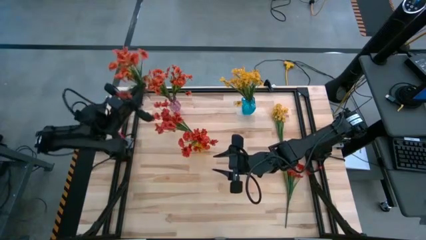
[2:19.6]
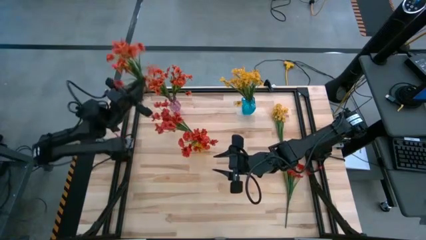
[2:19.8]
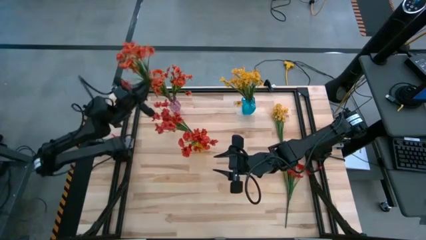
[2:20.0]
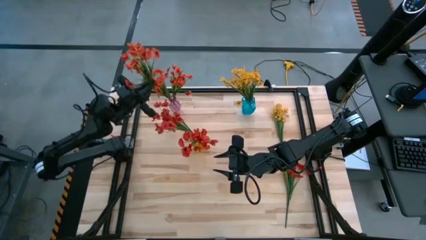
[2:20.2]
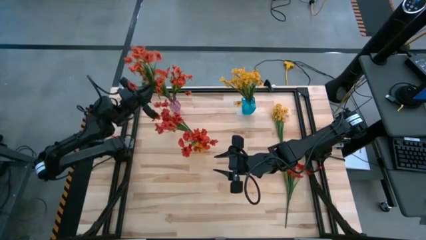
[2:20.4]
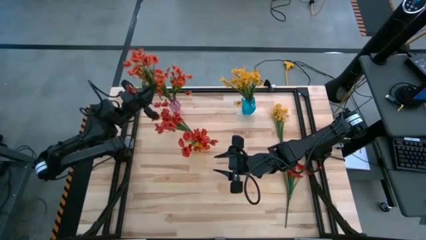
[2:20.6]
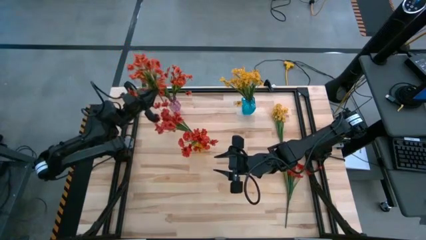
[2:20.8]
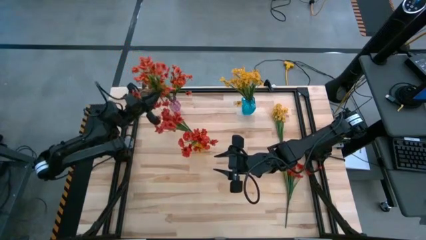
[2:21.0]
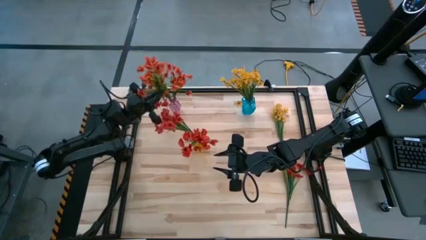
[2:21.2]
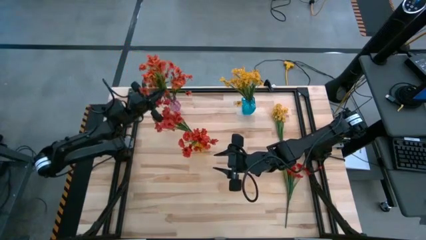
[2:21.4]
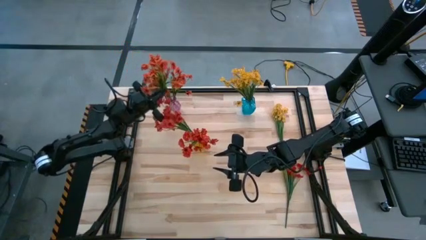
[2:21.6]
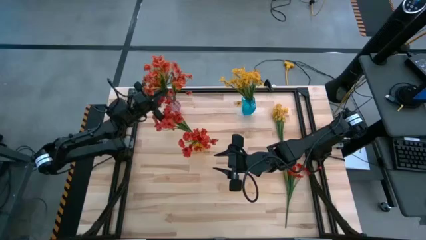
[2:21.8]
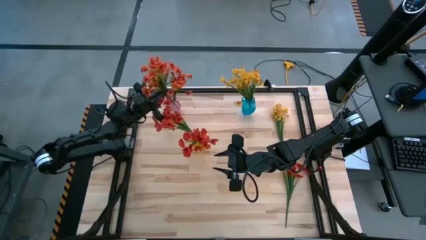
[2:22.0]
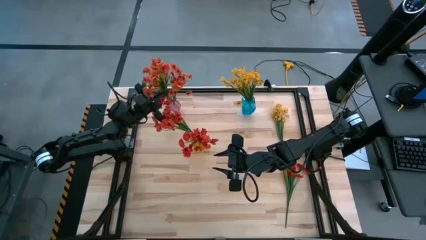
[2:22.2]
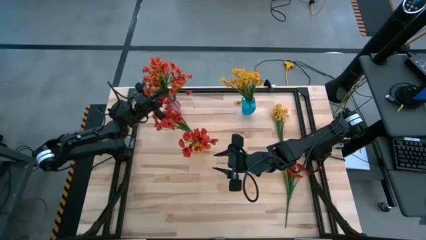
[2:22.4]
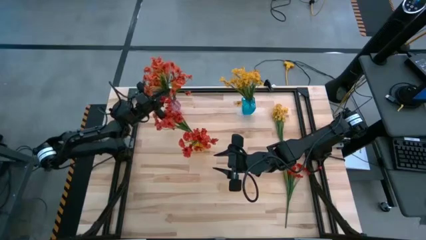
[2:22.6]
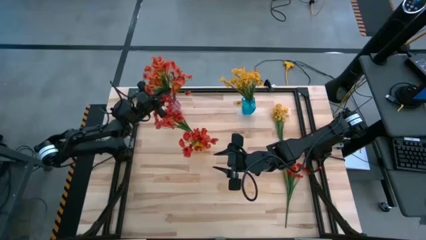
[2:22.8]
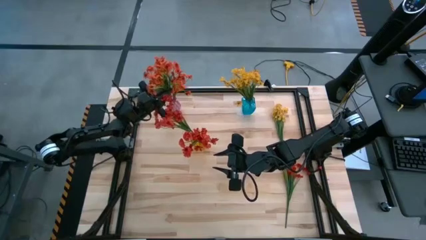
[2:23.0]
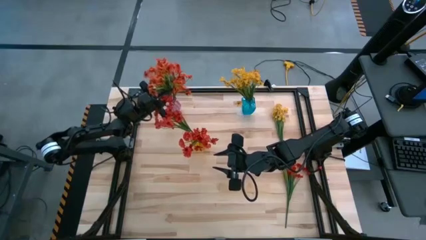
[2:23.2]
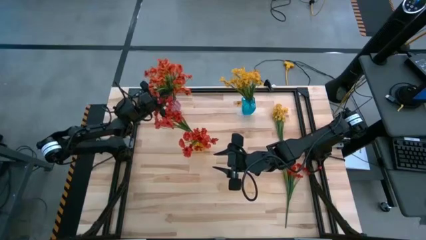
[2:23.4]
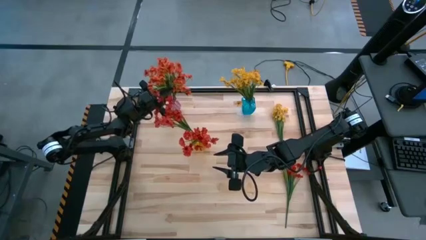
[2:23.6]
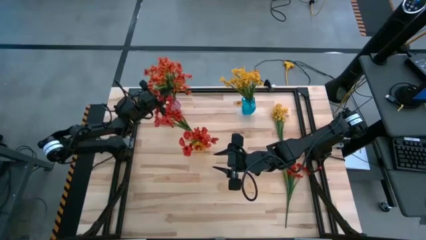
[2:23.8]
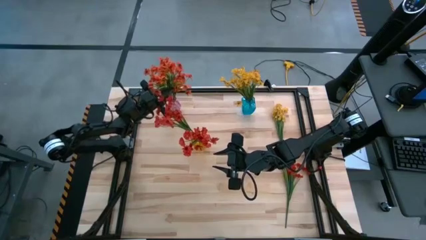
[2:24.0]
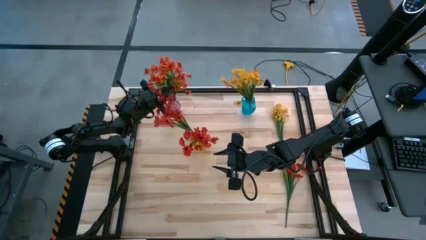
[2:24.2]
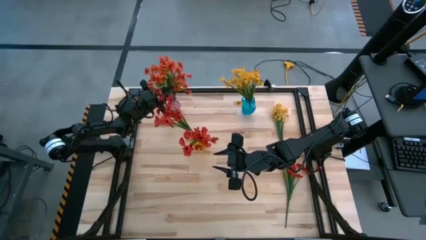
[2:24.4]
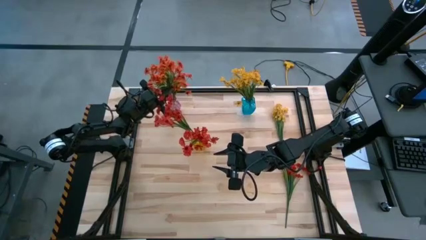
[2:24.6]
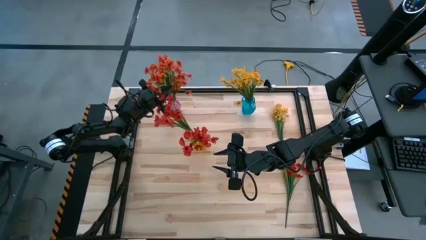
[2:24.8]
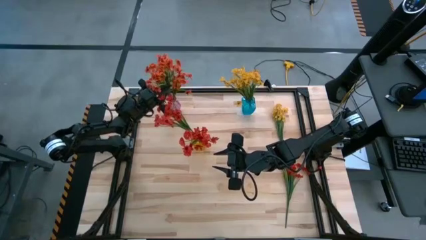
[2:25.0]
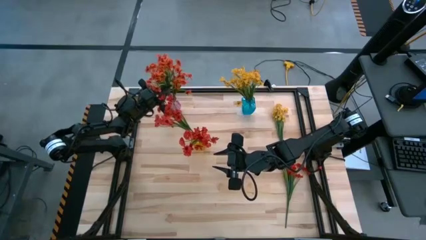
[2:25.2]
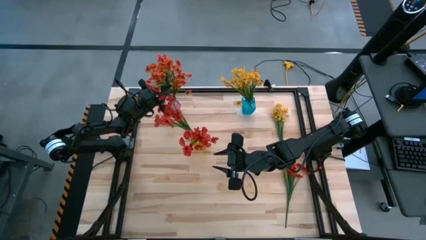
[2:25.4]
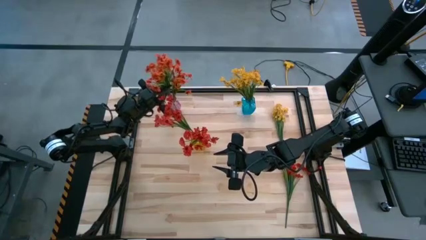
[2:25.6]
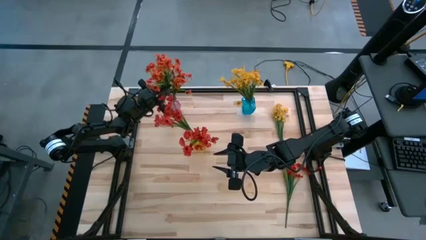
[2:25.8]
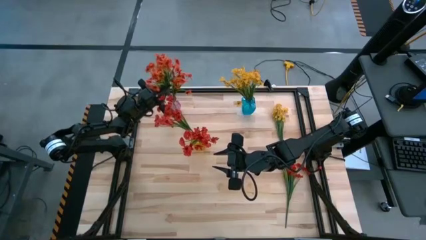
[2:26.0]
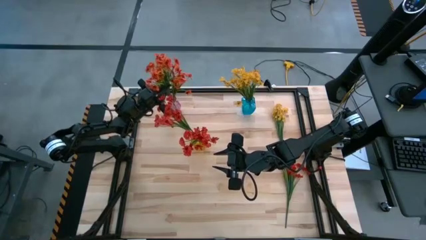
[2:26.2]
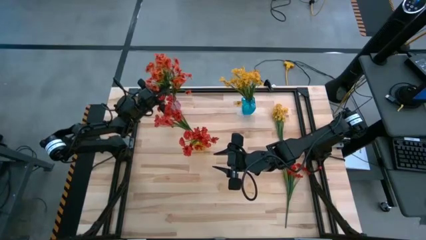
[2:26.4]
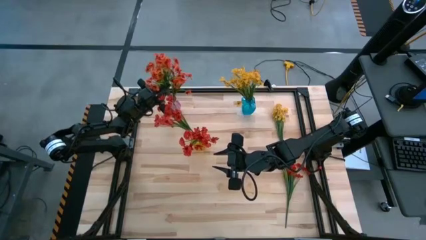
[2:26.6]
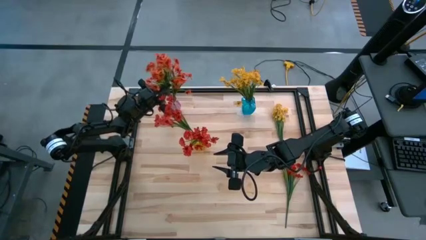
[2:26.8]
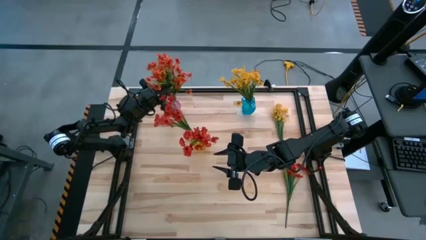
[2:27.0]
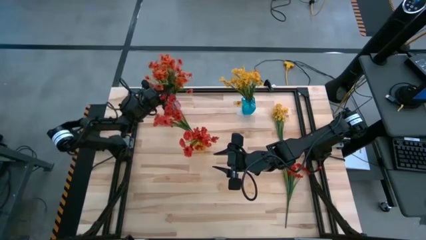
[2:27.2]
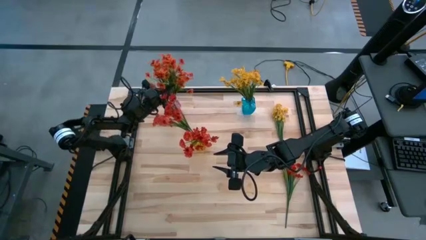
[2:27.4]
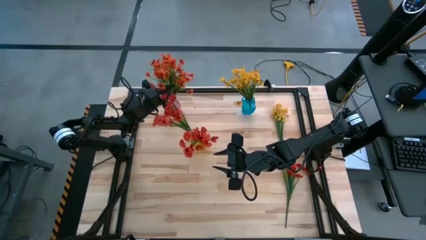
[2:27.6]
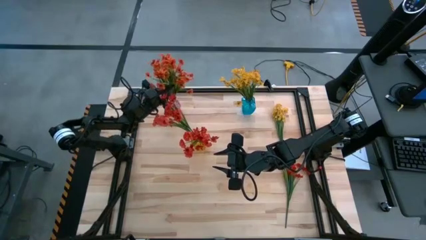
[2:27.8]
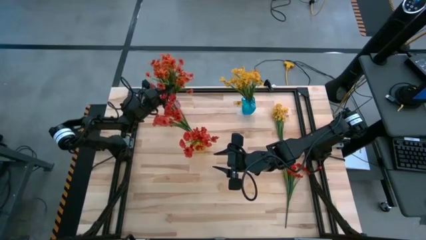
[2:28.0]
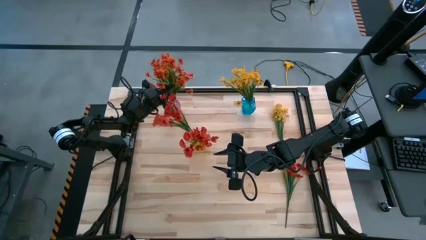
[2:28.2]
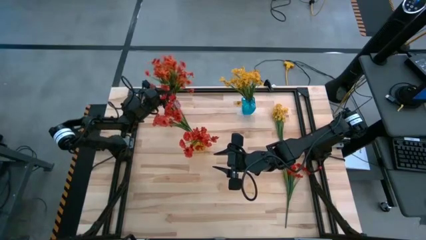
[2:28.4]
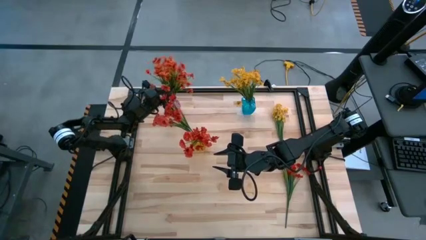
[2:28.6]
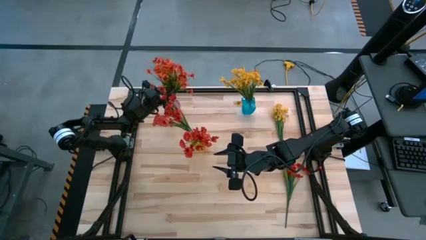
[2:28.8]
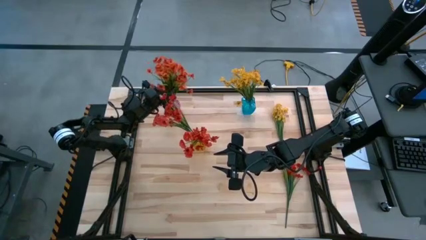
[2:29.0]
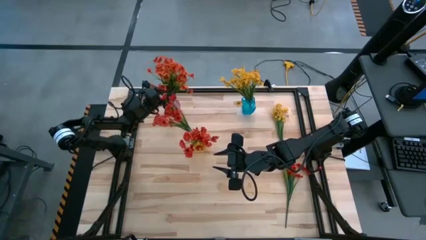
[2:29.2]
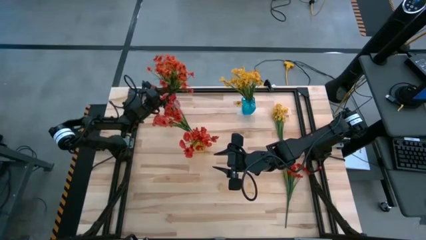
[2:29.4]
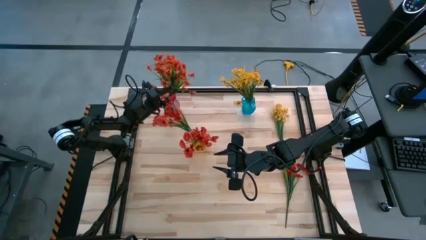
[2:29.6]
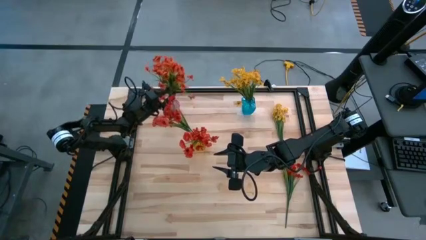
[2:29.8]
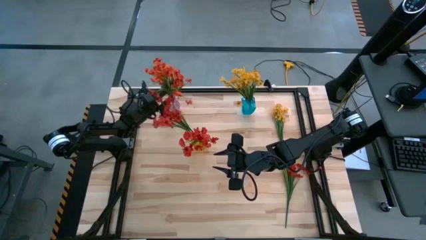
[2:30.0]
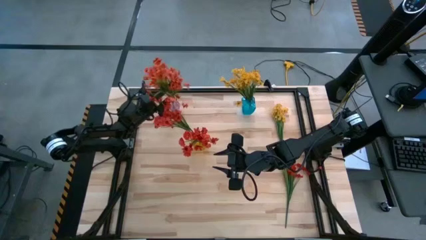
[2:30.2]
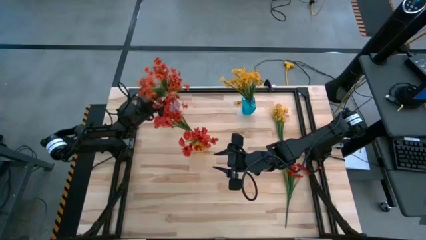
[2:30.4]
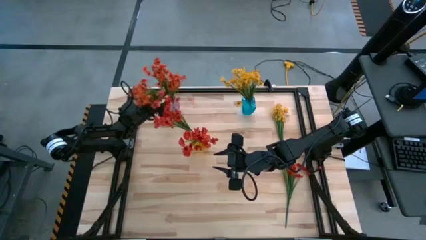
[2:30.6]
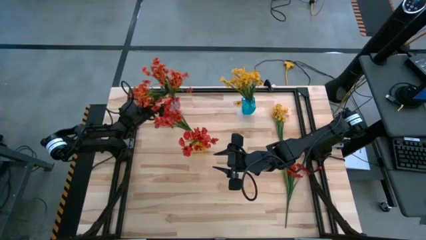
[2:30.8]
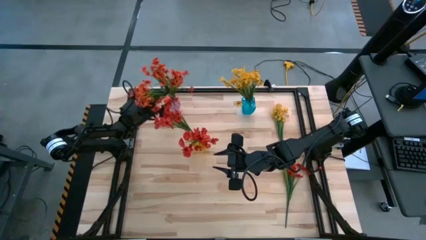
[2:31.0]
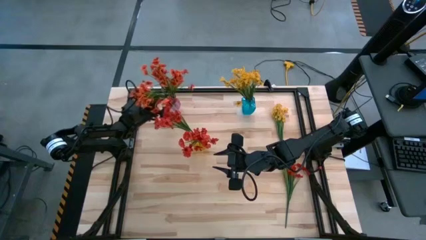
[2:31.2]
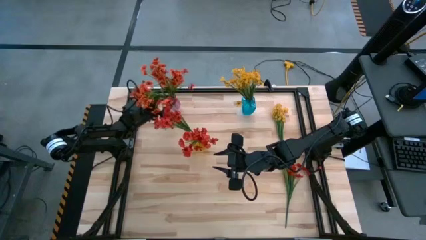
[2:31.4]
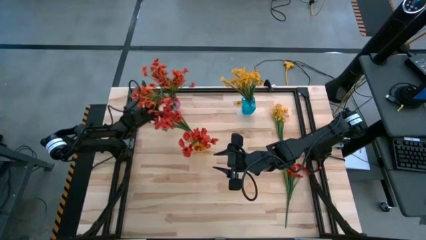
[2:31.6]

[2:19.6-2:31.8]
Task: Sort flowers into vase by color
Put the orange flower into the pink vase

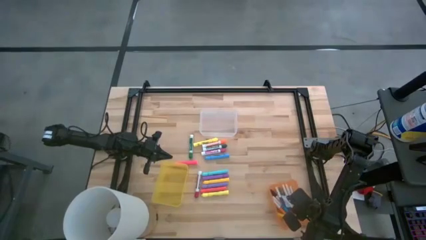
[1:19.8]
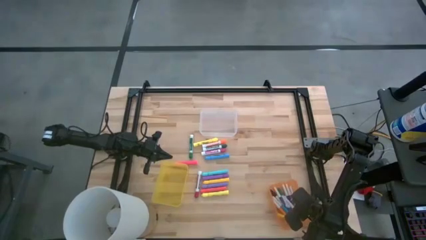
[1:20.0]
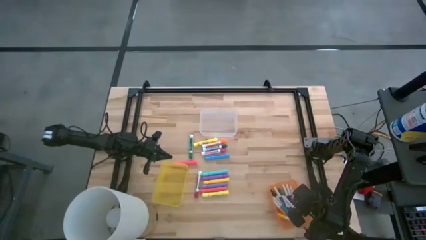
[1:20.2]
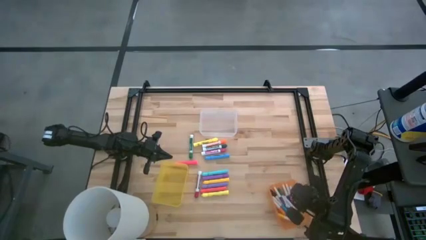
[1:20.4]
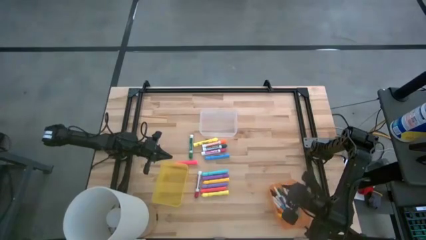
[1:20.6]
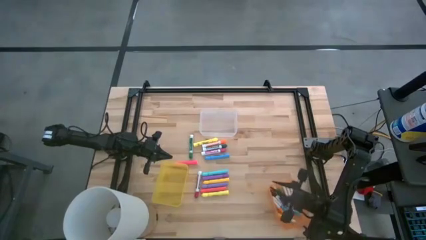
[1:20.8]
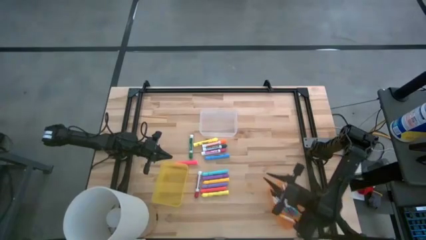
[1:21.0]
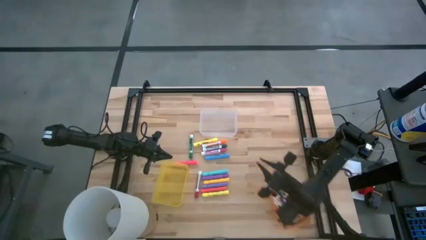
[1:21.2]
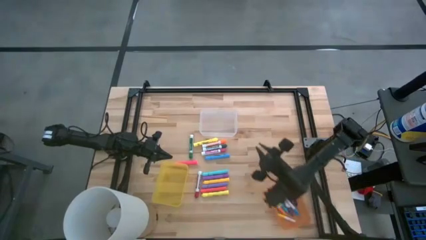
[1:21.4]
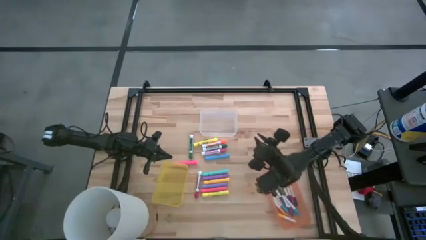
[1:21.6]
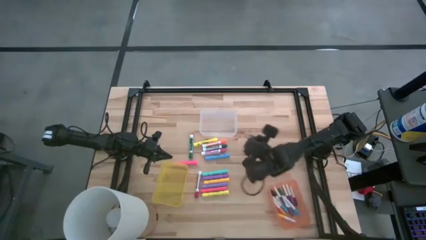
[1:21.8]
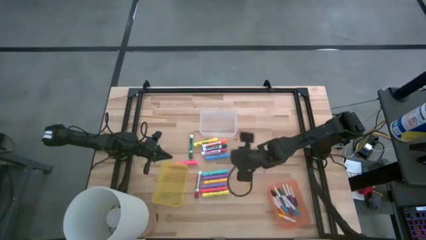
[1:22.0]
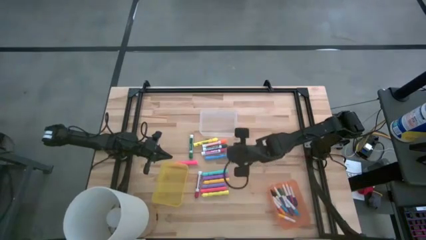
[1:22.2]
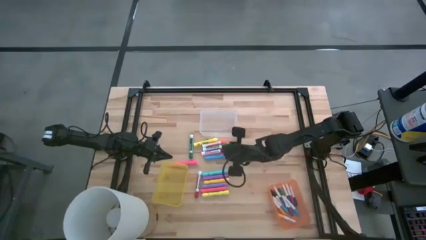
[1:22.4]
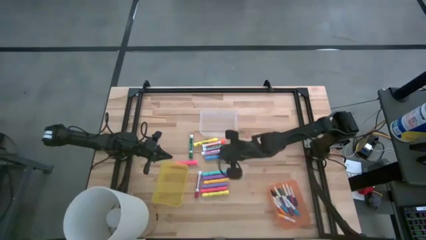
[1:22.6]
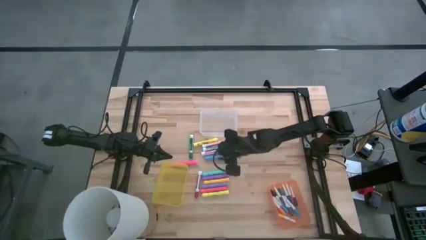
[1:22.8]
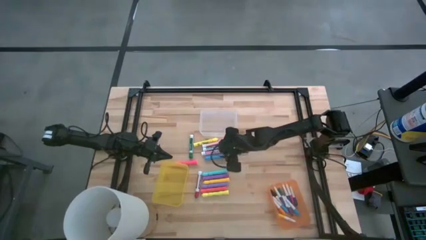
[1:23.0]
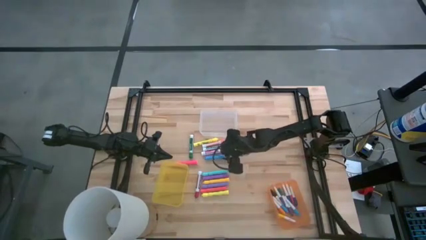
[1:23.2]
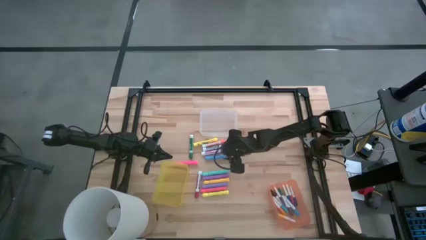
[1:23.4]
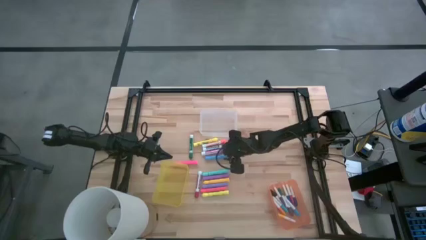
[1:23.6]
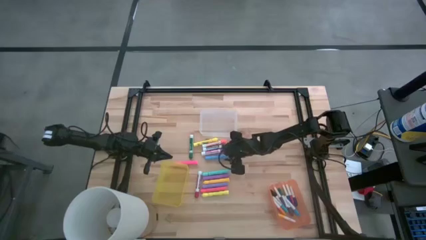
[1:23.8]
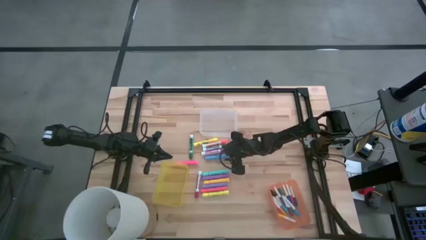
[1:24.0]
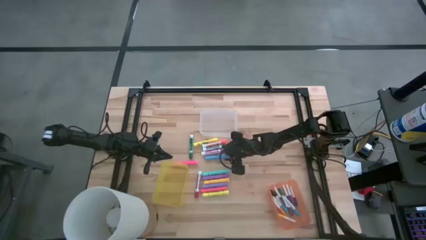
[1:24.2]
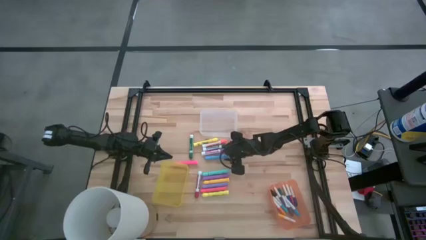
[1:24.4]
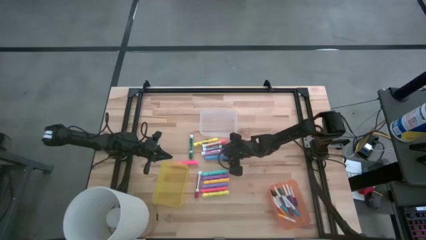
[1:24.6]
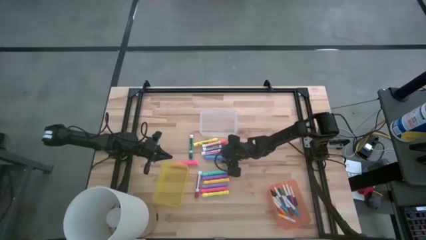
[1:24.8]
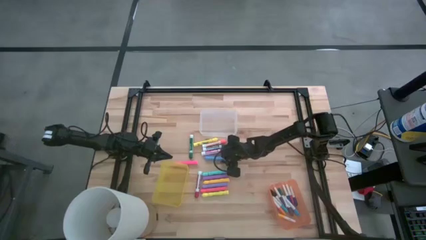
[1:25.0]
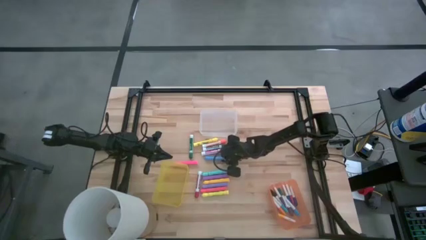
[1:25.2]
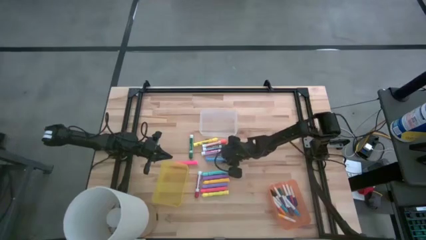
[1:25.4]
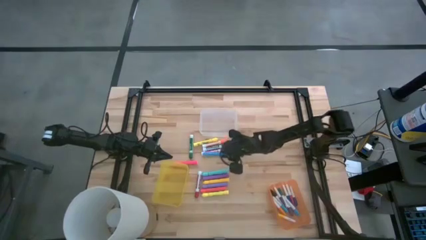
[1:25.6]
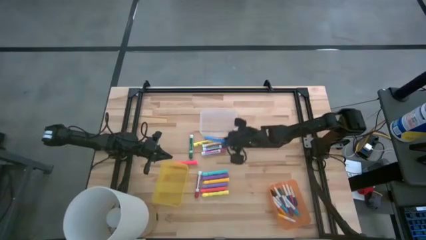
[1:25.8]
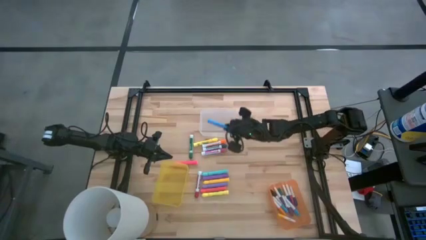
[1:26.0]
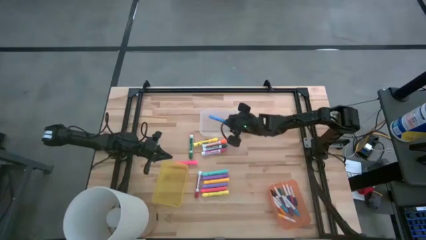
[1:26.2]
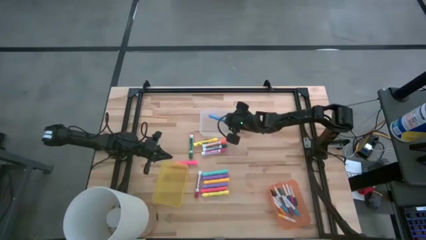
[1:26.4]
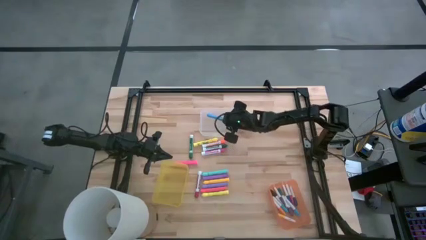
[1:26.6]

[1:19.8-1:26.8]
Task: Pick & Place Markers
Put the large blue highlighter pen into the transparent bin
